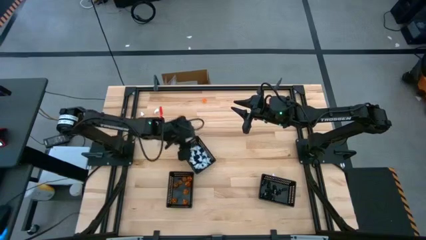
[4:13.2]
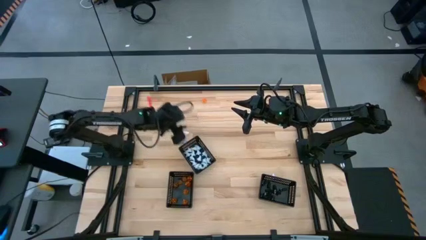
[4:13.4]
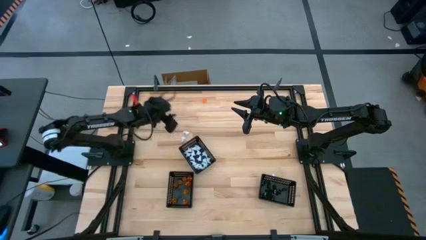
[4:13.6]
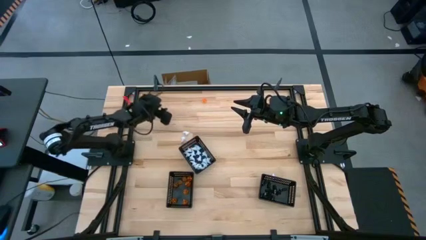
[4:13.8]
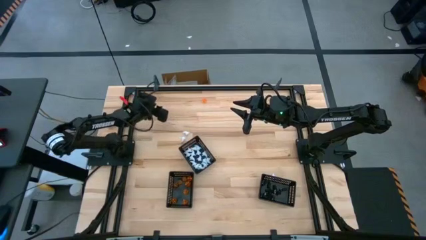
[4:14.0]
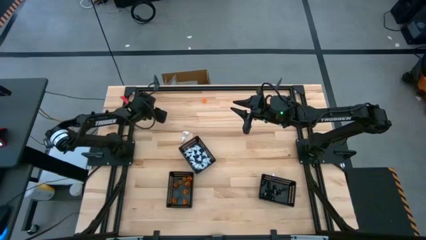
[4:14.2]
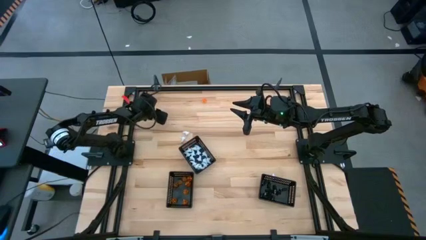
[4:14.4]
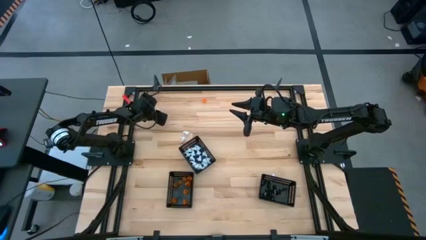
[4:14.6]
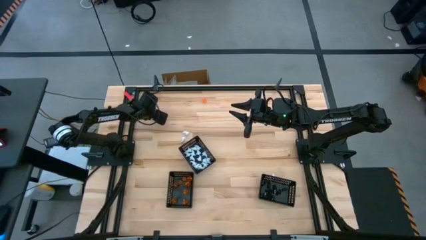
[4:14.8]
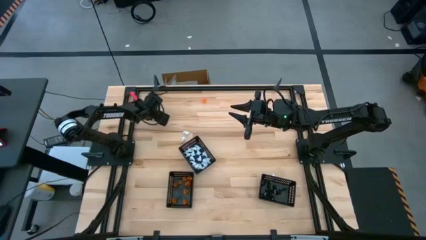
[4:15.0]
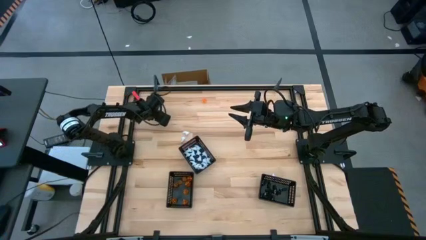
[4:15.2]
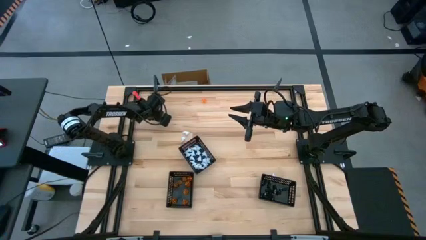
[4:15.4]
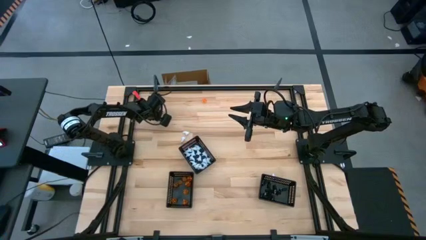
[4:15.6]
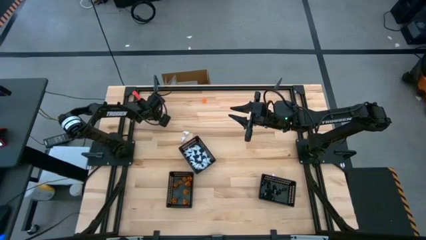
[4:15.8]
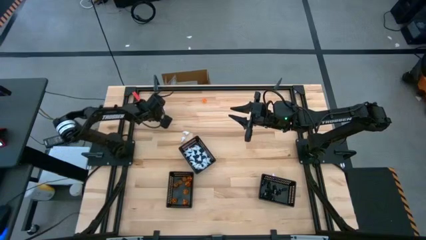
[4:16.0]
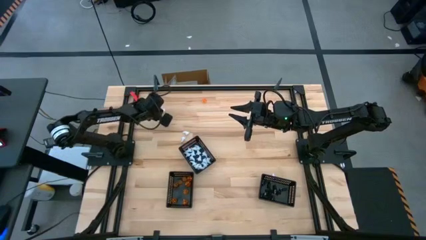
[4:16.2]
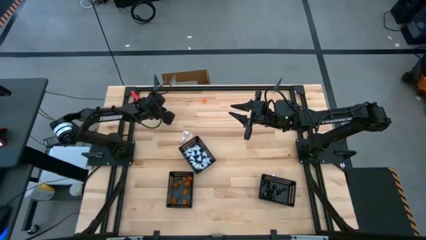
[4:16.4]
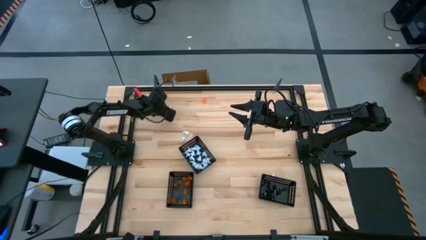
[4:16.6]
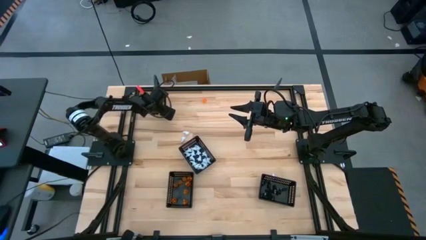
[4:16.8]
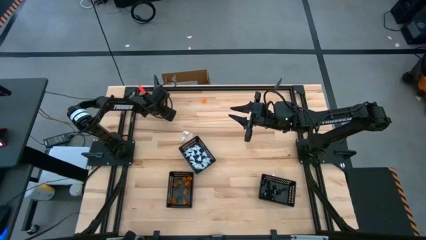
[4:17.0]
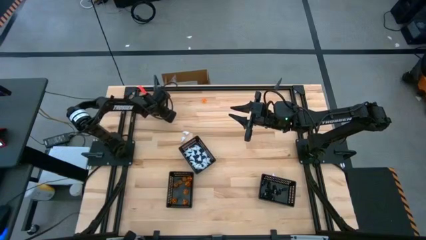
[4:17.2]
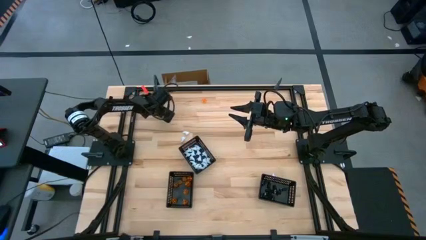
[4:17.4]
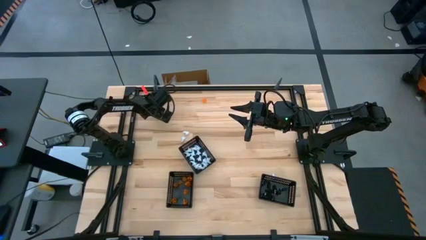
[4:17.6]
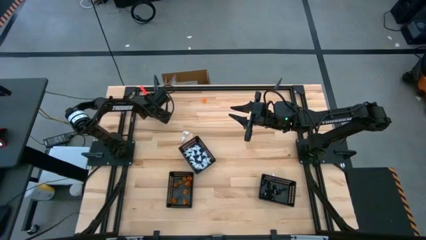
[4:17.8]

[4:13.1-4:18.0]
Task: Sort Halloween decoration
Put the white ghost toy into the middle black basket

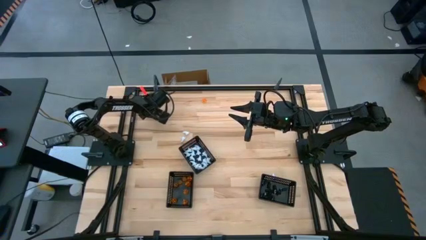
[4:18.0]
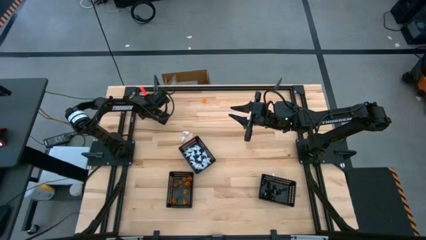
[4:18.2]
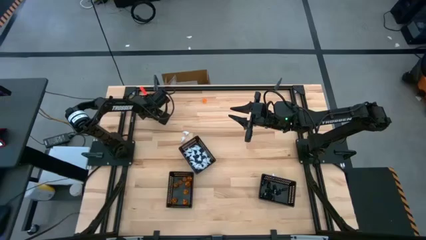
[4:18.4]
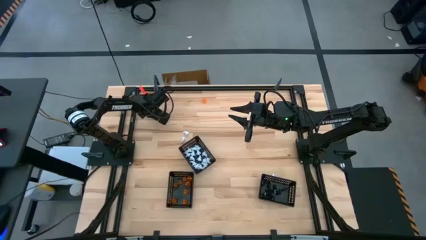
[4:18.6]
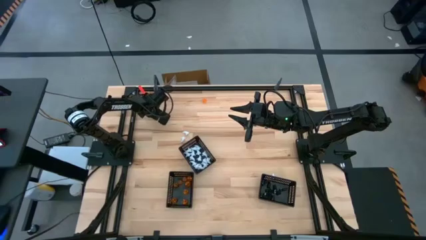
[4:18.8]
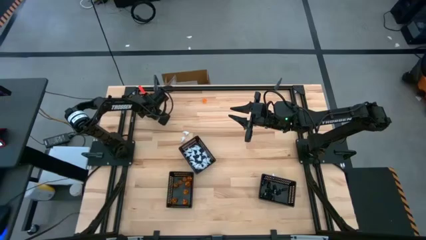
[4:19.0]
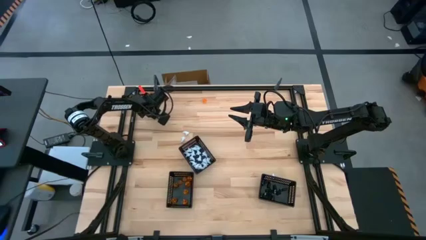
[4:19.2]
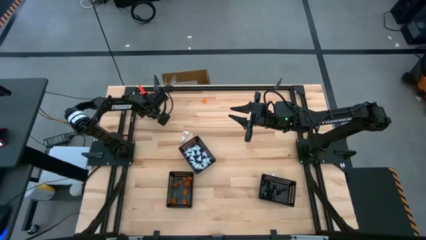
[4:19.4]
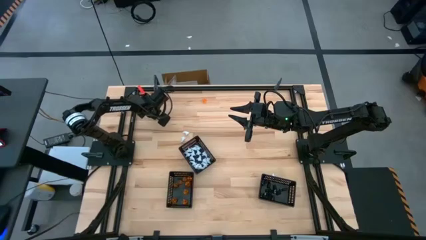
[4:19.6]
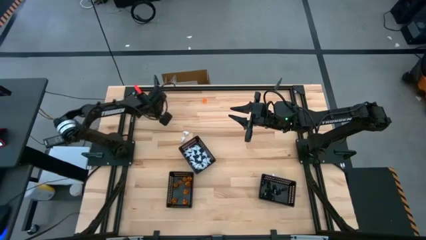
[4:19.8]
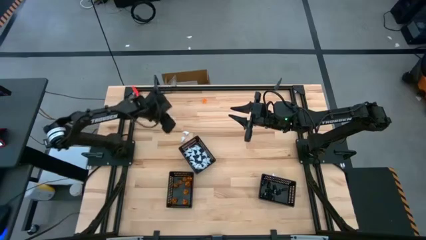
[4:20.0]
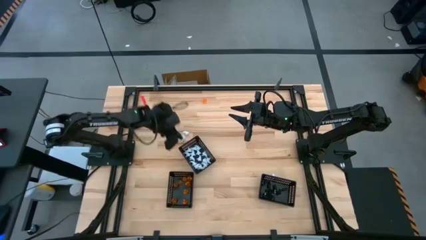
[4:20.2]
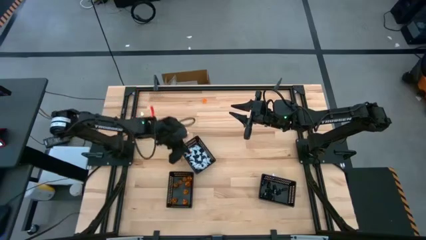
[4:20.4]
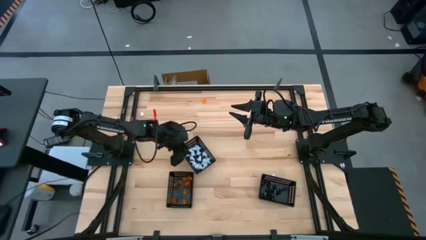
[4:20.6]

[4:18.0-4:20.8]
Put the white ghost toy into the middle black basket

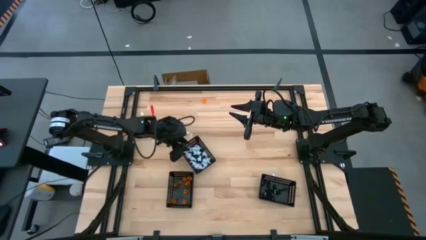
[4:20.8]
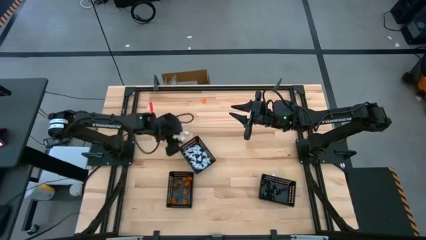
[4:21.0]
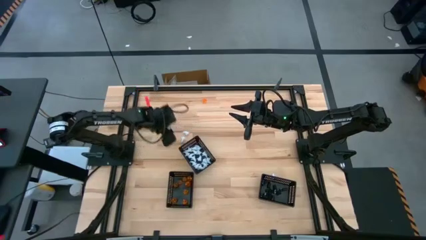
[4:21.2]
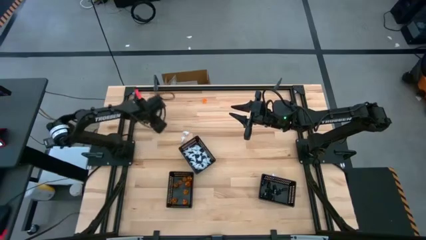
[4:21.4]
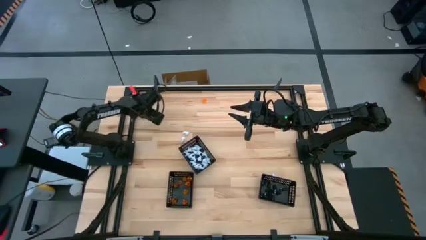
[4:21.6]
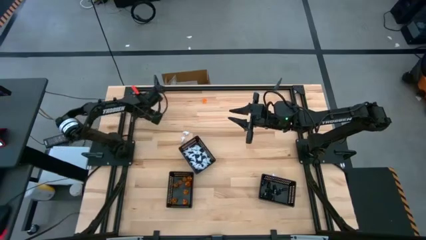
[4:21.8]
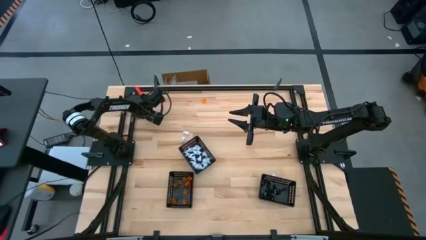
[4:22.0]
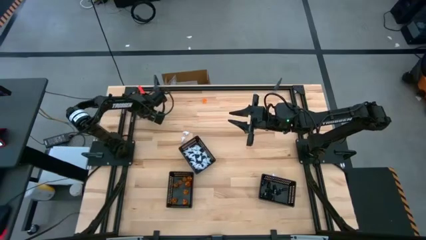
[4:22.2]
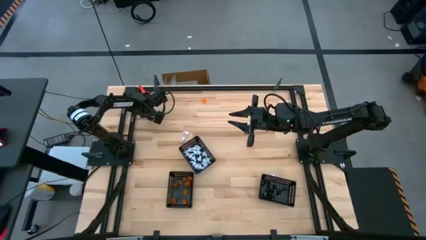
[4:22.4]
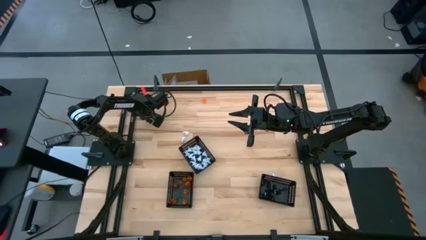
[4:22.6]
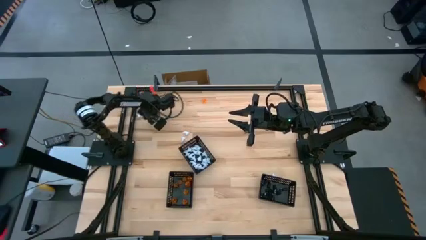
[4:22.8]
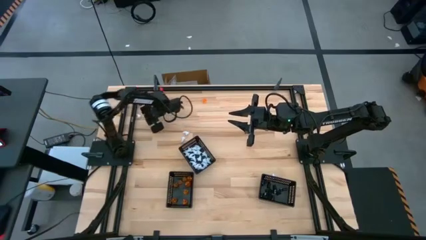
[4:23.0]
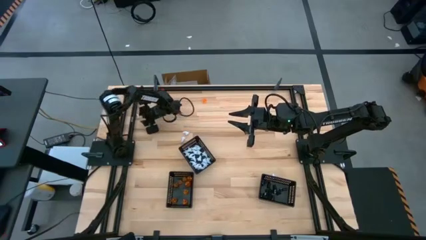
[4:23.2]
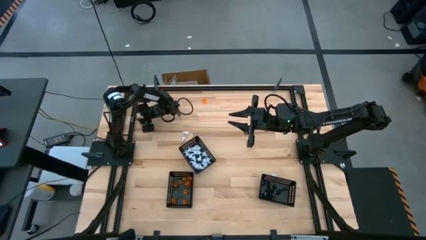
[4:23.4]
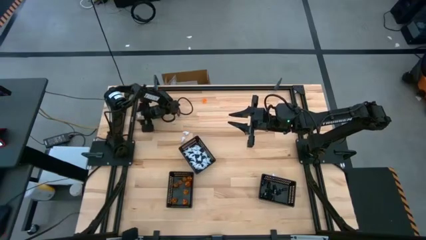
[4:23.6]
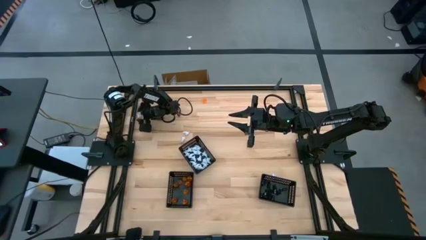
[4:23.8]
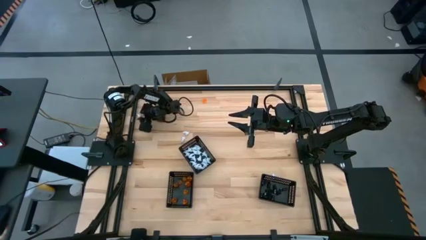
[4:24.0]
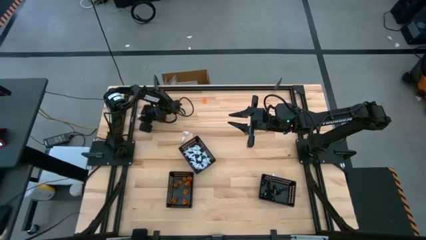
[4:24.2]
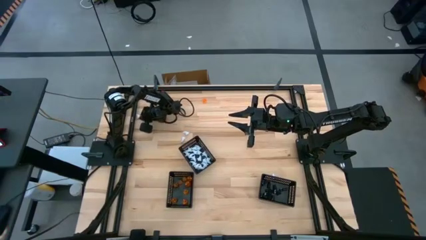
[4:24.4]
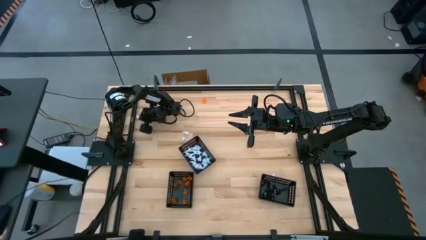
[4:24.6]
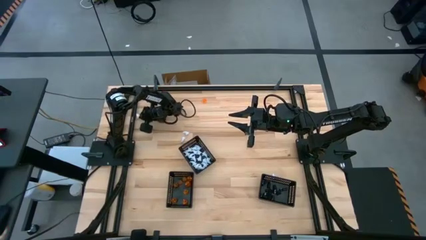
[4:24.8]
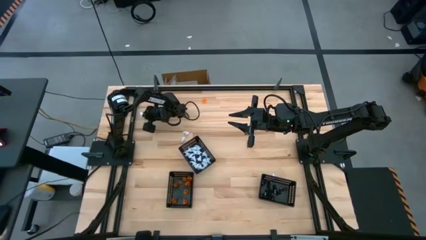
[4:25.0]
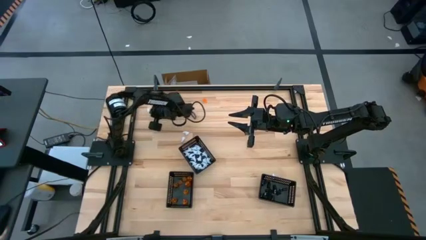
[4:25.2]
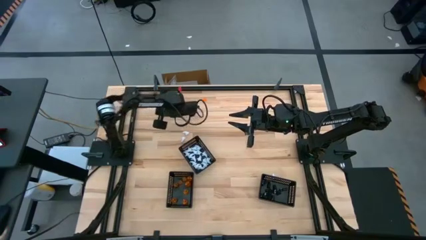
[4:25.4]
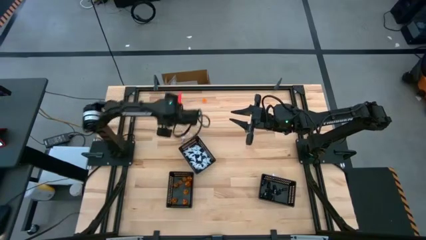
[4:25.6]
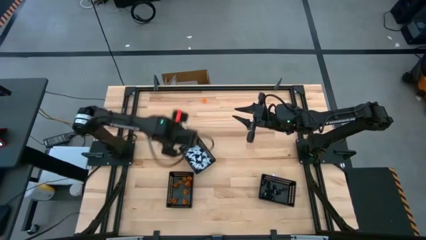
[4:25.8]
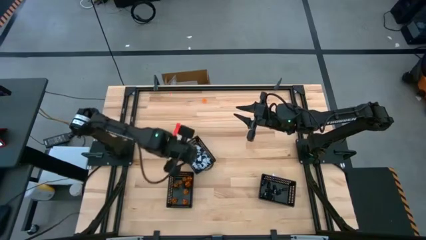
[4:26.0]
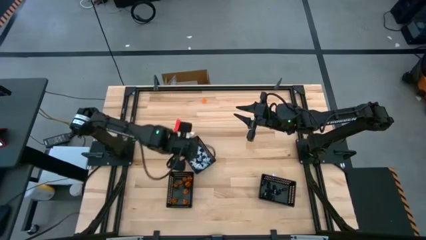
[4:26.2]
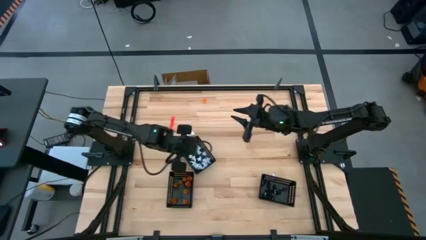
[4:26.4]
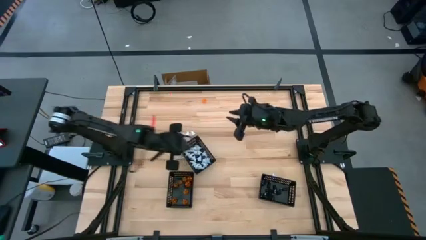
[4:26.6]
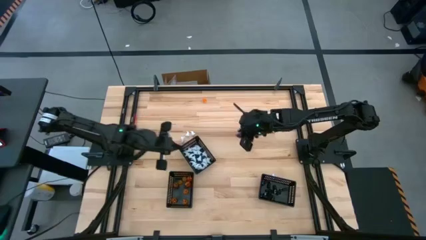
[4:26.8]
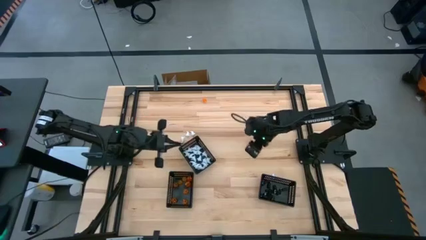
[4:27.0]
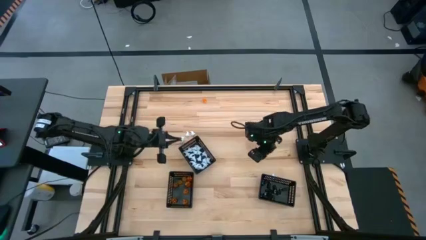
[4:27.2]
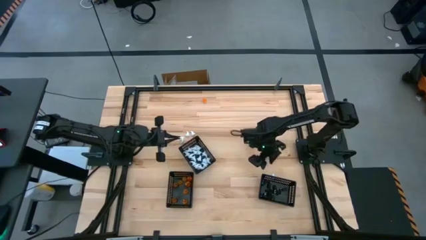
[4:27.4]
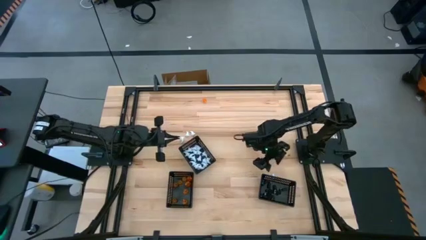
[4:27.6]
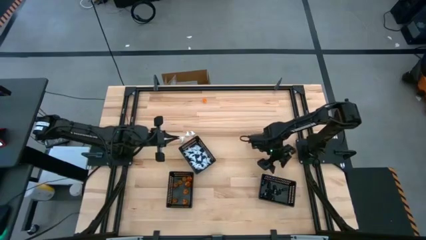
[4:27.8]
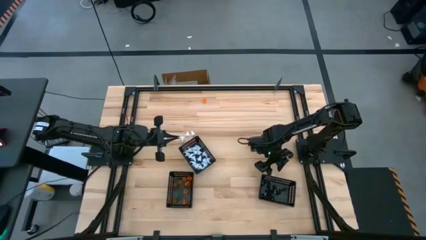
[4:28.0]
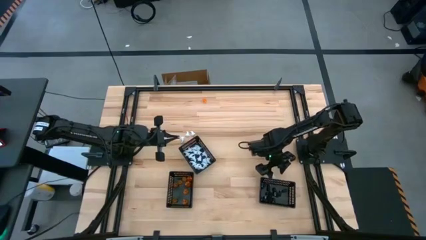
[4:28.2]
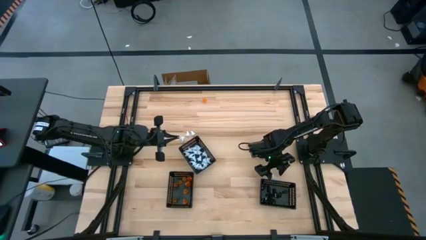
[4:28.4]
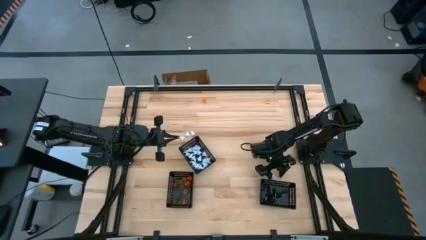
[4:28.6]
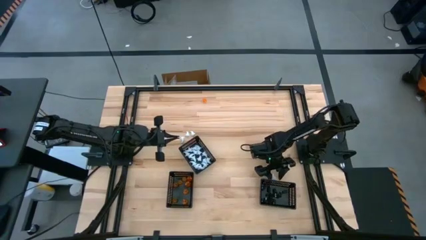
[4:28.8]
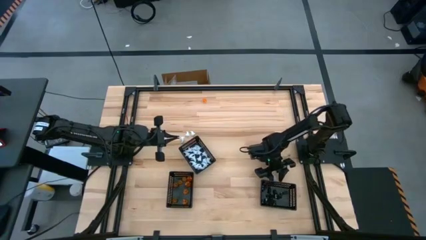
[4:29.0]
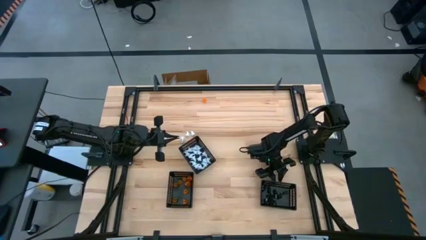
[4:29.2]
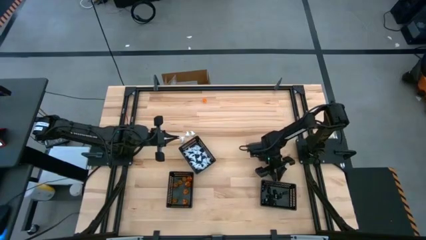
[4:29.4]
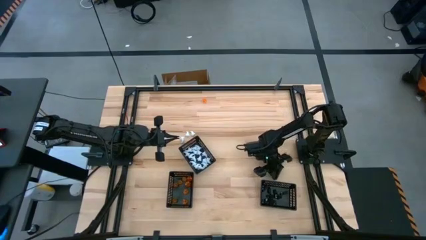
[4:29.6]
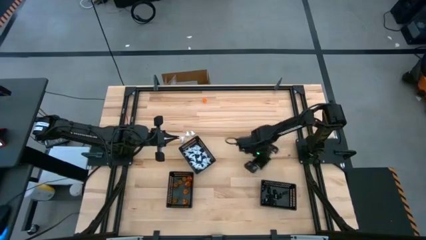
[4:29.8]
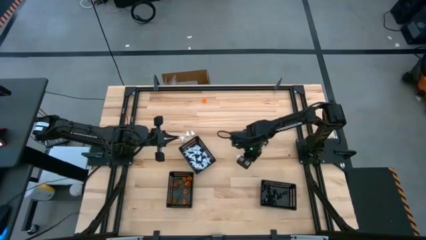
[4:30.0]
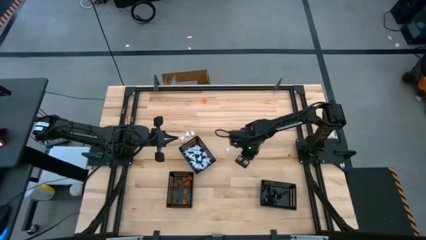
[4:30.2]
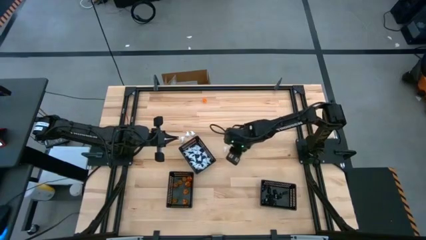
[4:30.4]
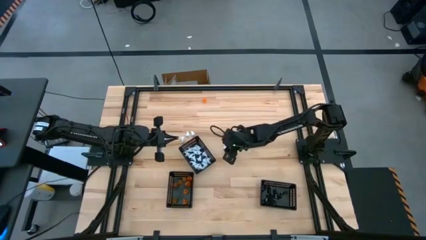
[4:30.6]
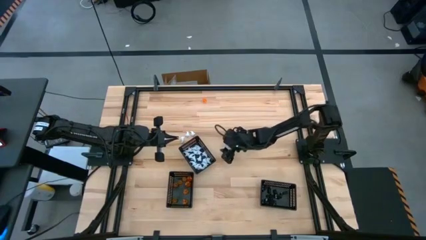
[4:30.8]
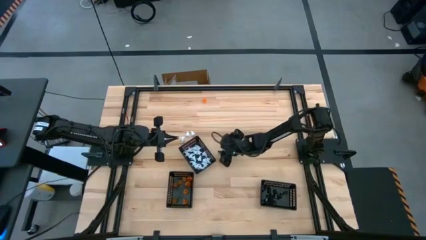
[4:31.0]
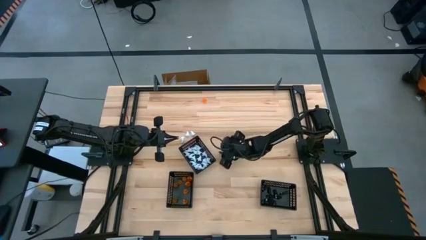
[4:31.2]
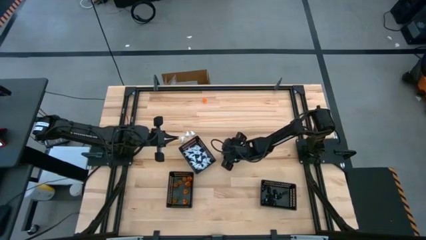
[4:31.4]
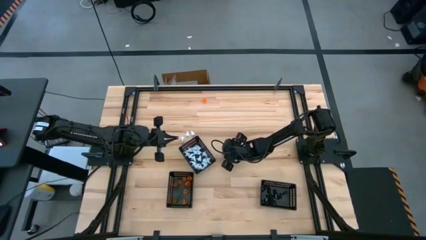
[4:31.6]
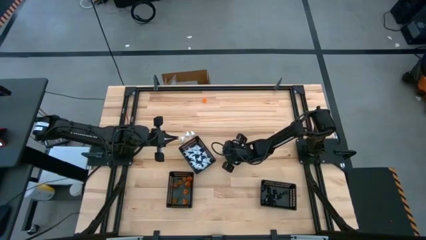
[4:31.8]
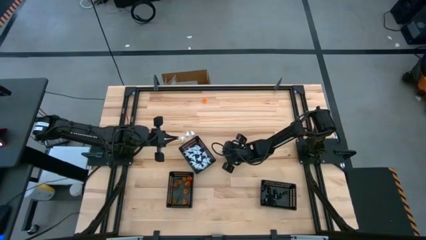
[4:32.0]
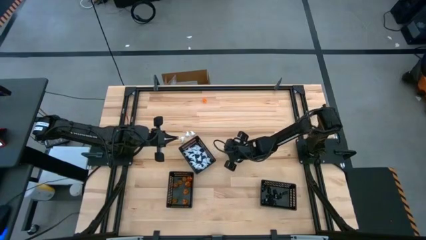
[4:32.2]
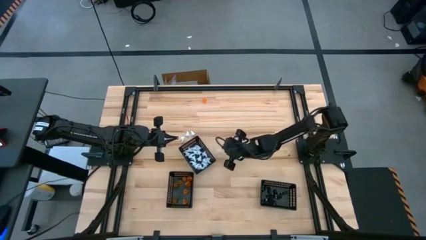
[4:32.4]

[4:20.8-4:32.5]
Put the white ghost toy into the middle black basket
